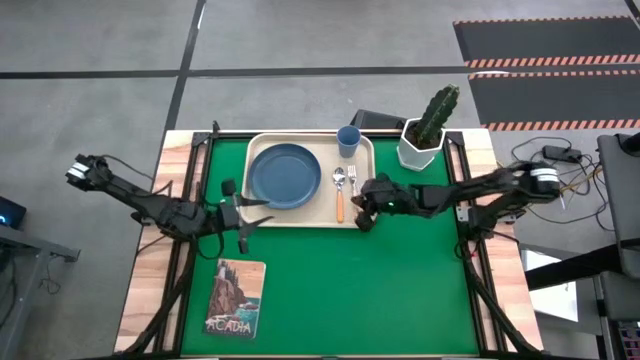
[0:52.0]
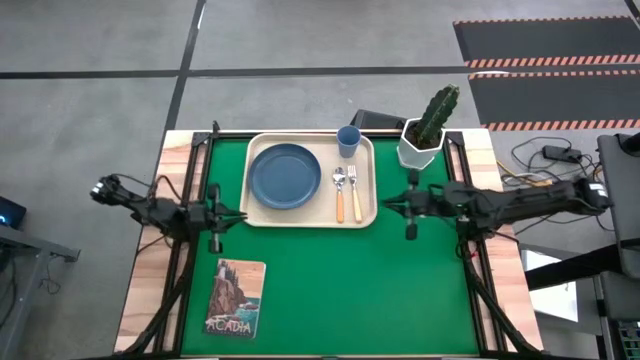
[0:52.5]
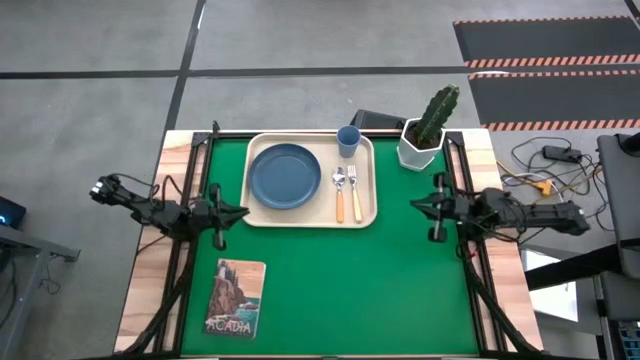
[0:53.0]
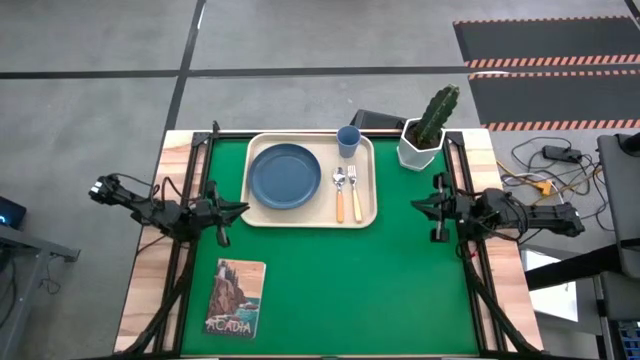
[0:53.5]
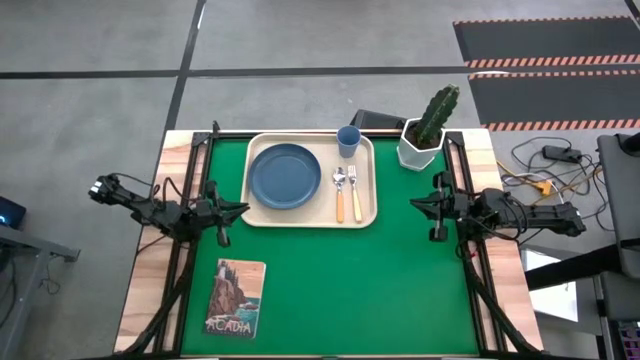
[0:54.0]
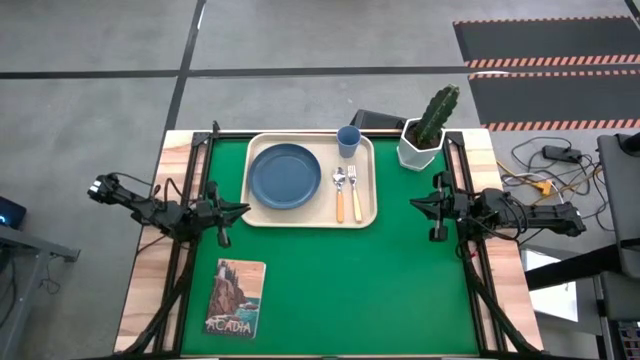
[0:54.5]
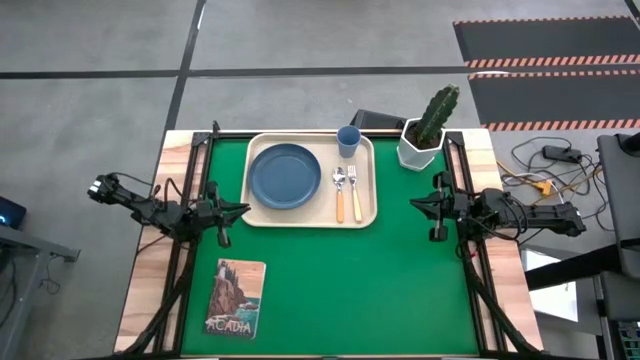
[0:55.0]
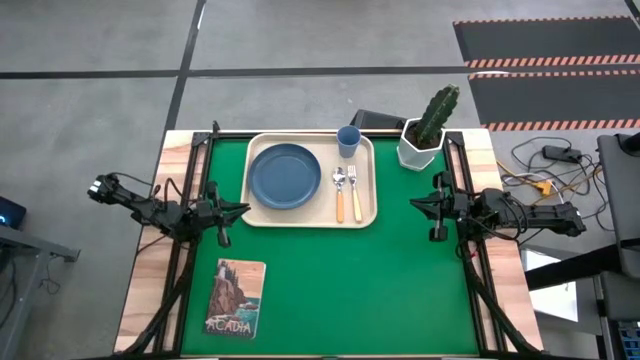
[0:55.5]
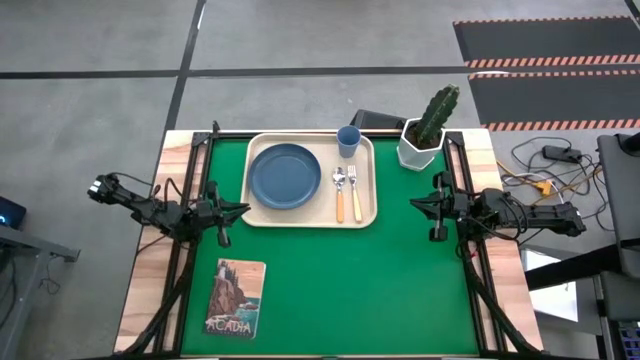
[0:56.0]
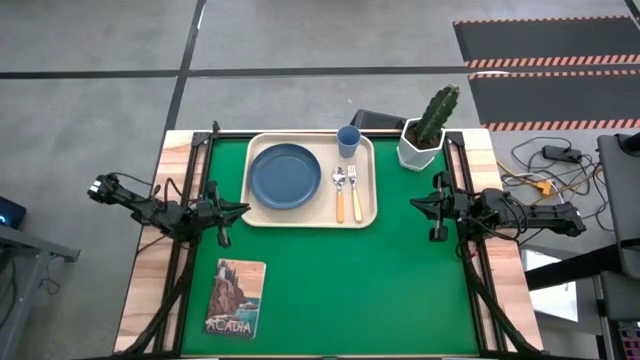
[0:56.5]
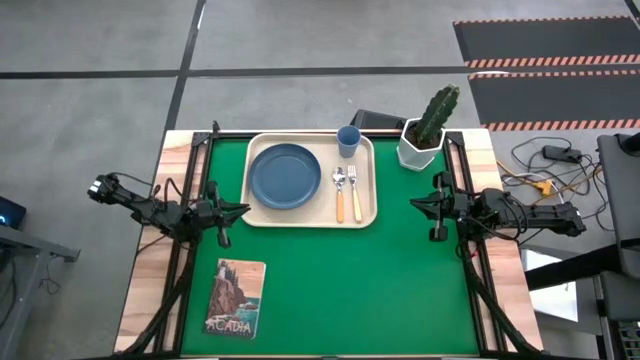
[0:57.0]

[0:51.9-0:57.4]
Task: Pick and place plate/cup/fork/spoon on tray
Return to Home Position

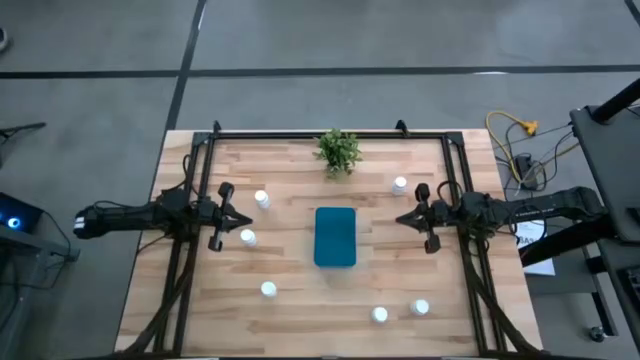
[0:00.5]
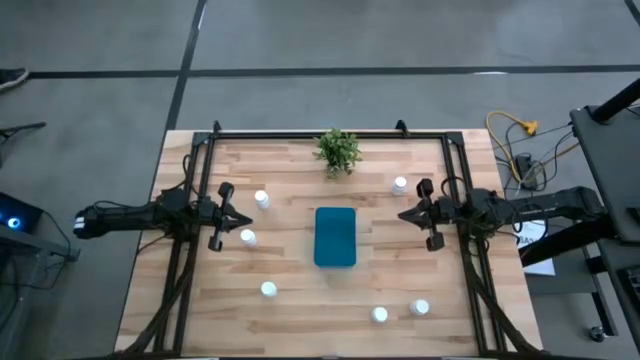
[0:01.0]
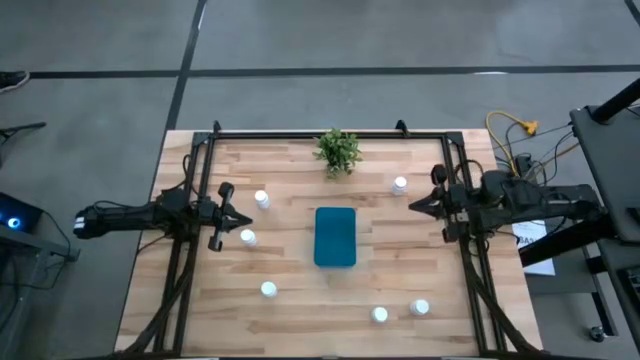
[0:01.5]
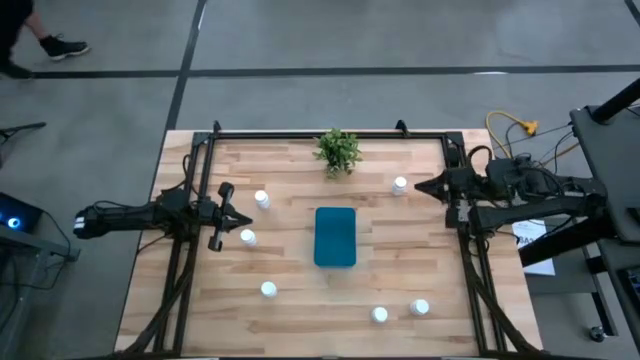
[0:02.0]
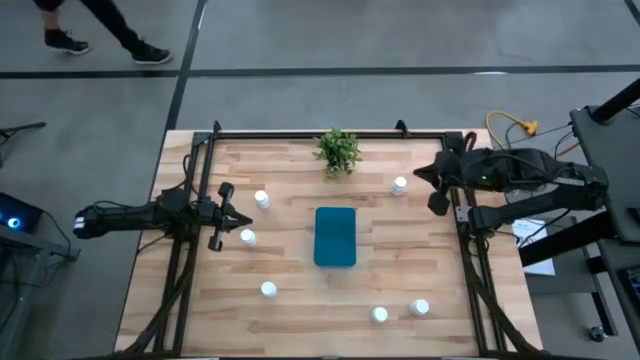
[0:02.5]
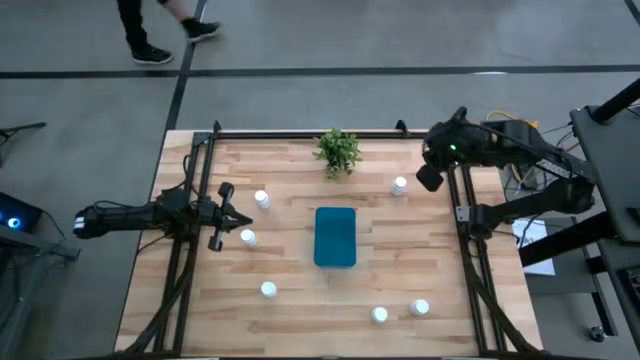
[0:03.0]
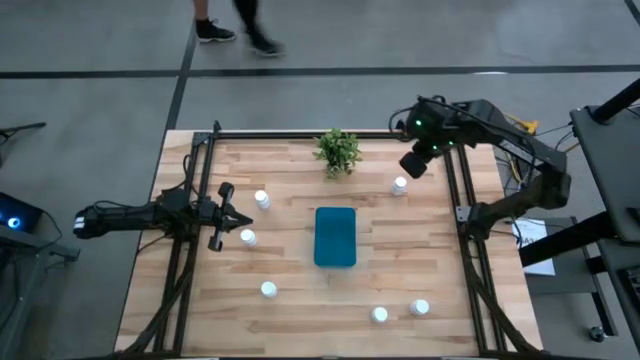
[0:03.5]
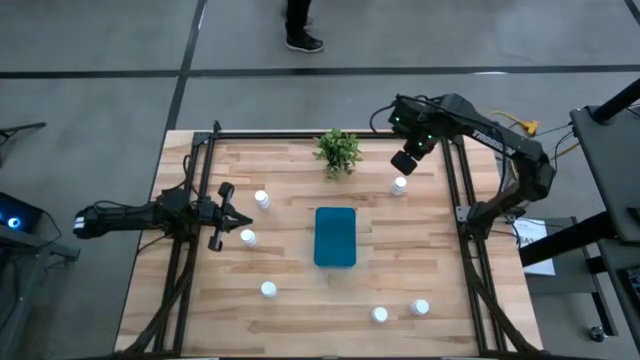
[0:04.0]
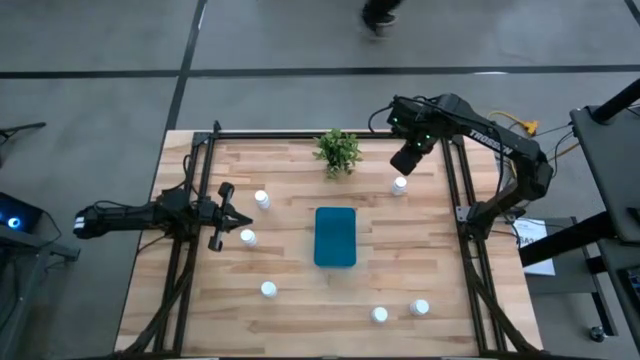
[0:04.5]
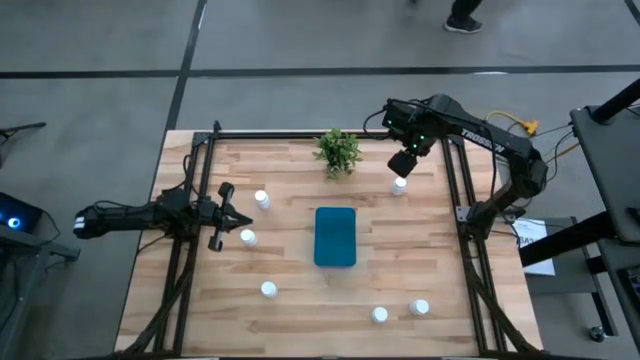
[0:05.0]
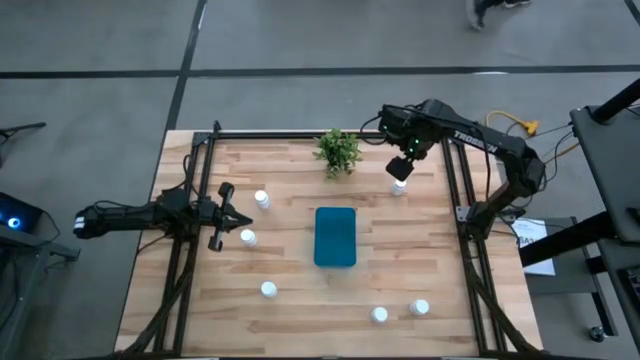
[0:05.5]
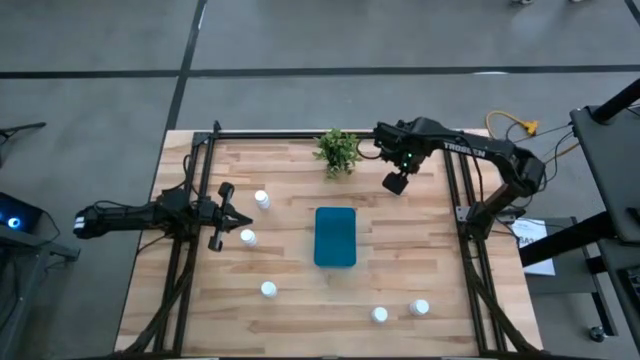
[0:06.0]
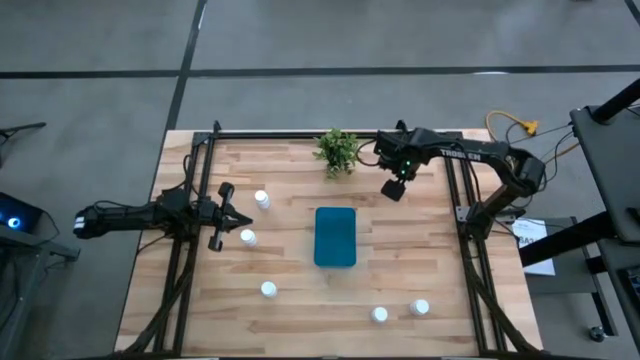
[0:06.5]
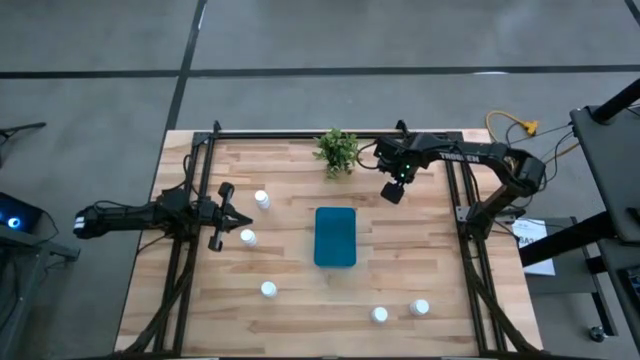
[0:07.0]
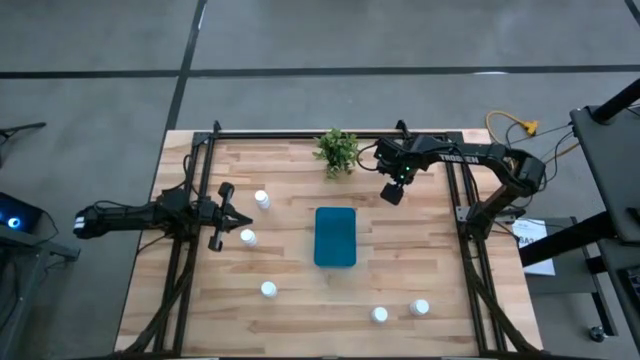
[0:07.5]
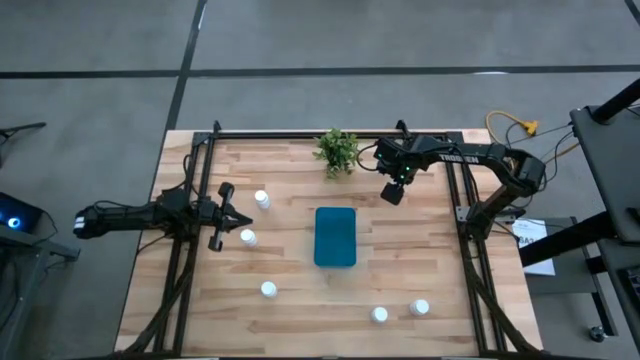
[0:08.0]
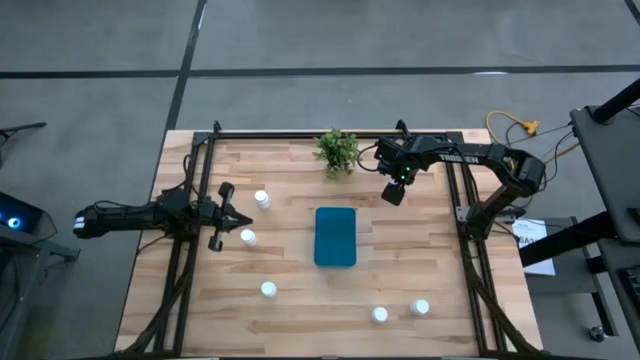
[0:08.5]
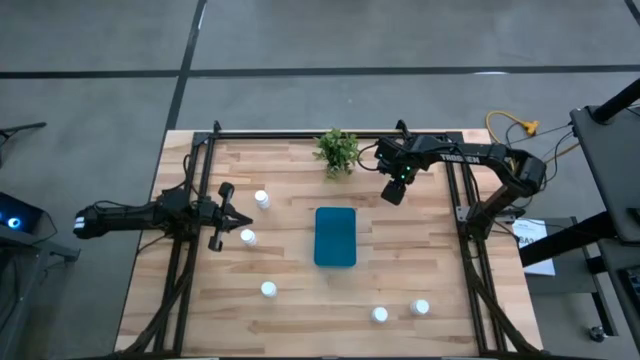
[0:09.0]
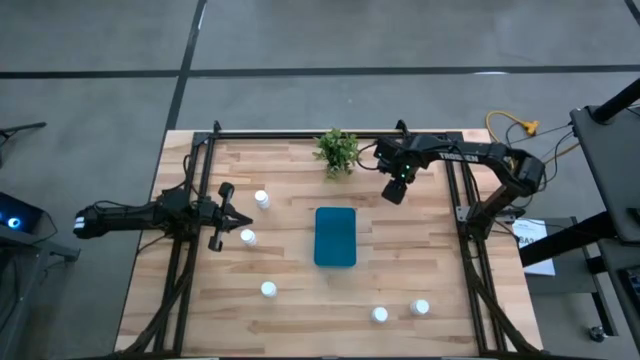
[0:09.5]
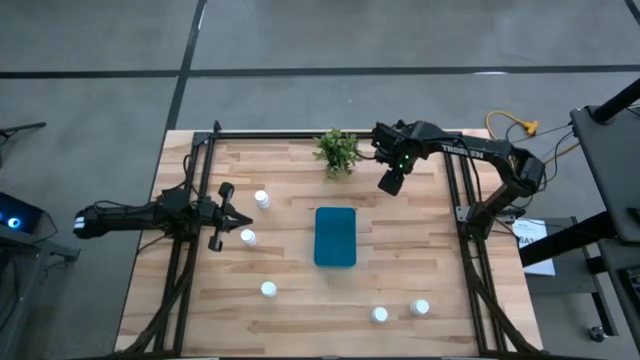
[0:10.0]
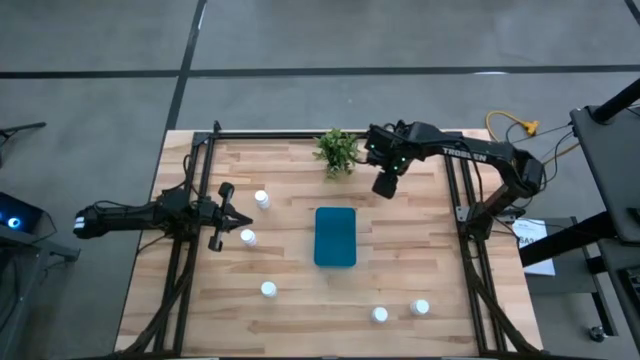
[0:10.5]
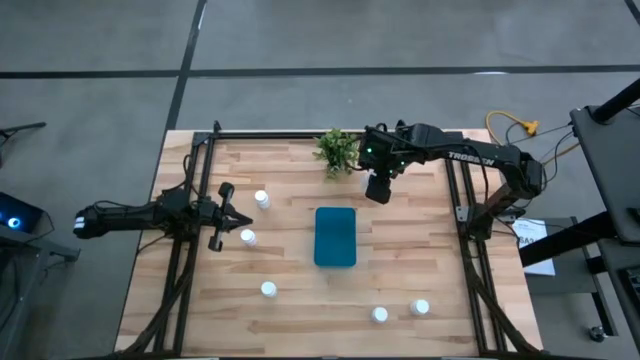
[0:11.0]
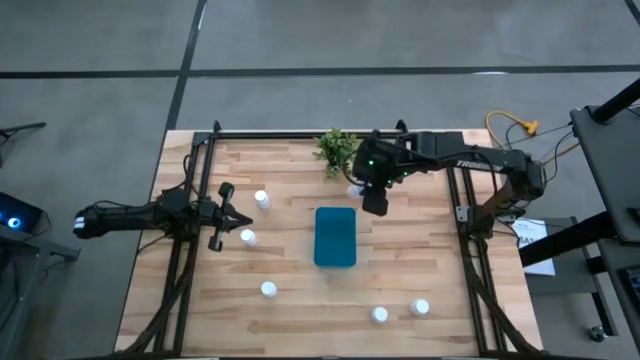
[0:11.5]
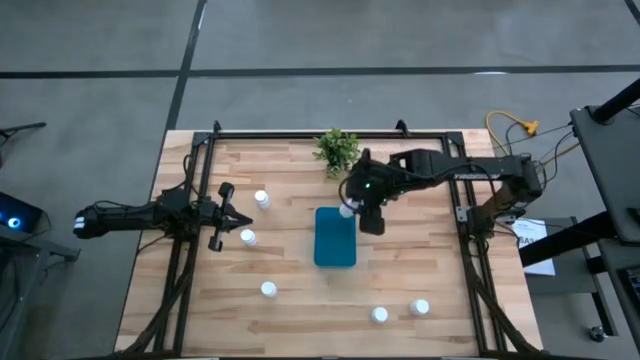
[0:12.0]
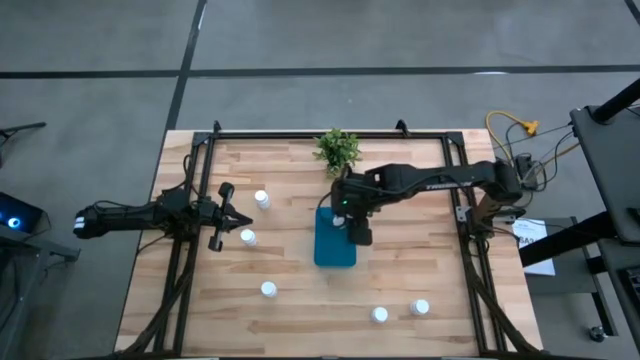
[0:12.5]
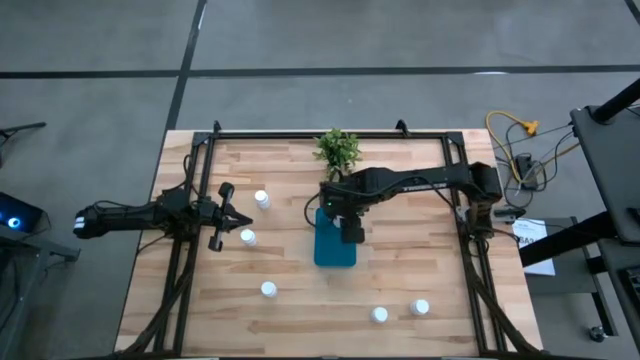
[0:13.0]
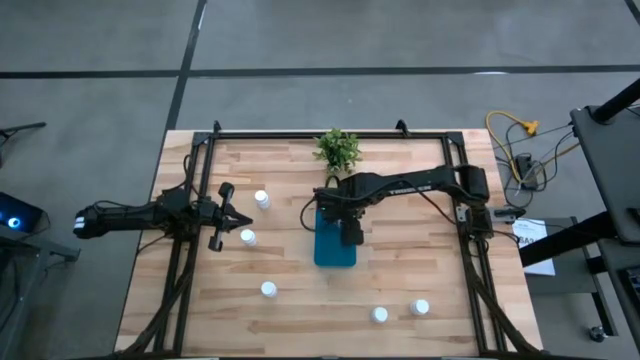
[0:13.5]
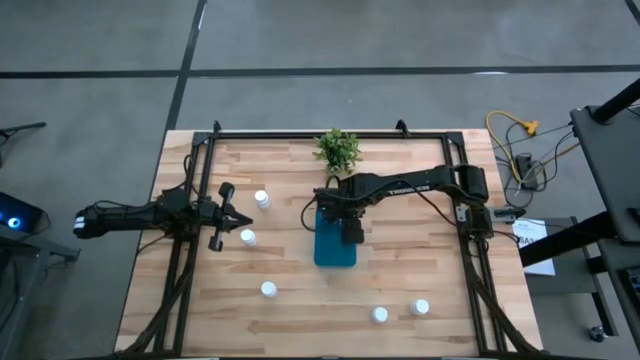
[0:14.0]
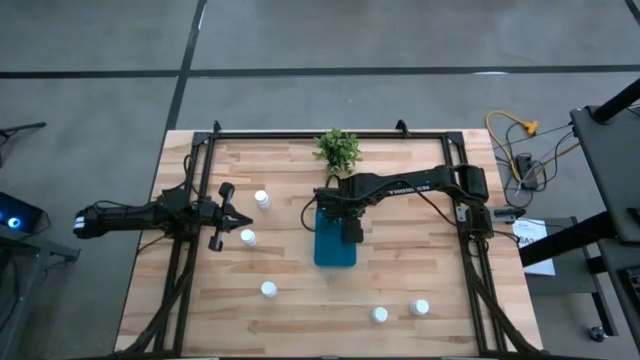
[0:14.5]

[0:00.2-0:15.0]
Task: Pick and place pill bottles into a basket
Put the white medicine bottle into the blue bin
